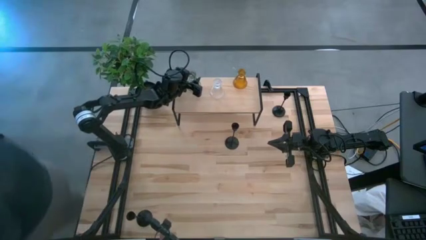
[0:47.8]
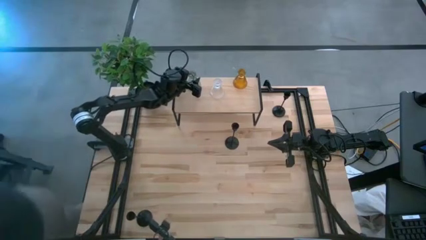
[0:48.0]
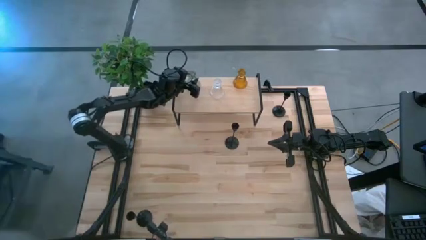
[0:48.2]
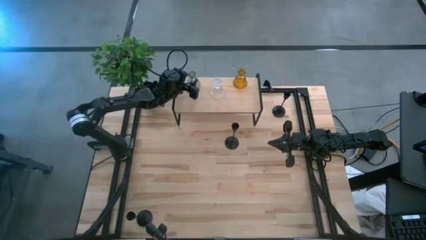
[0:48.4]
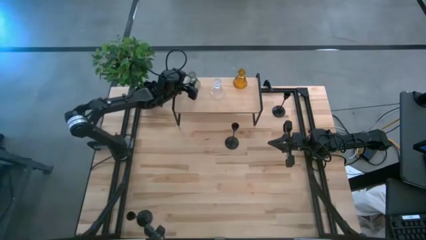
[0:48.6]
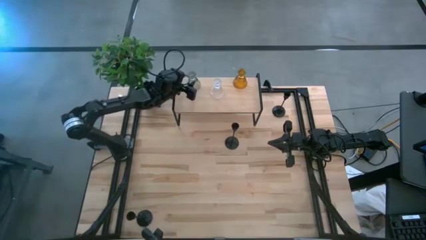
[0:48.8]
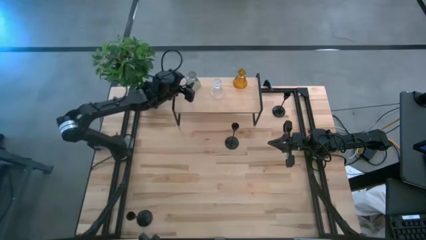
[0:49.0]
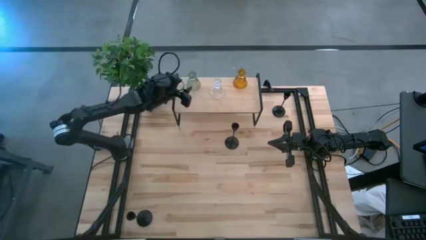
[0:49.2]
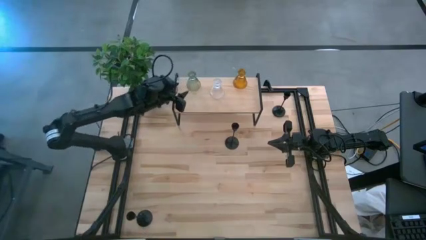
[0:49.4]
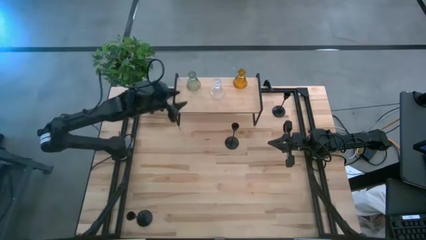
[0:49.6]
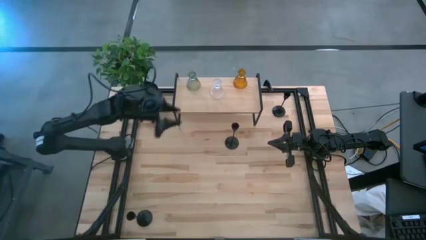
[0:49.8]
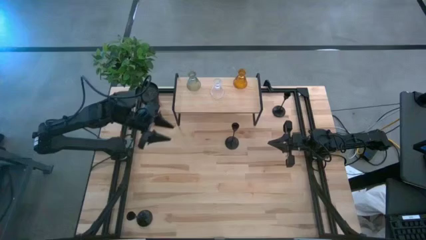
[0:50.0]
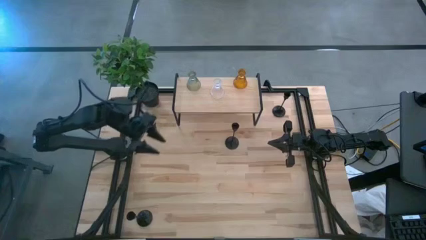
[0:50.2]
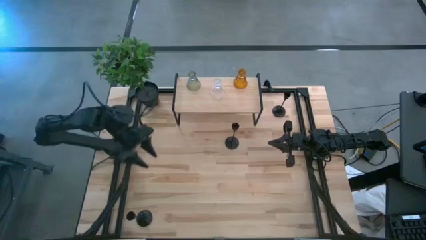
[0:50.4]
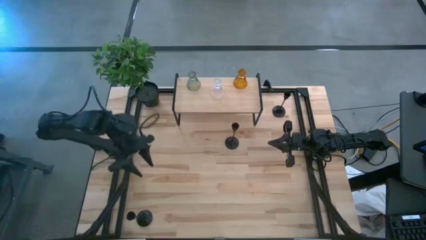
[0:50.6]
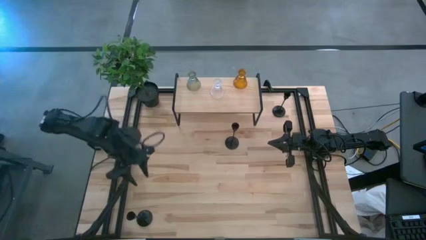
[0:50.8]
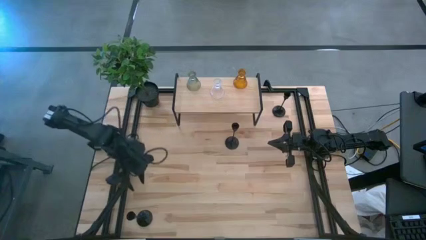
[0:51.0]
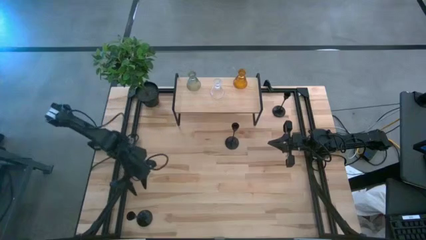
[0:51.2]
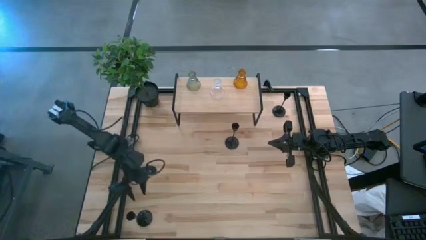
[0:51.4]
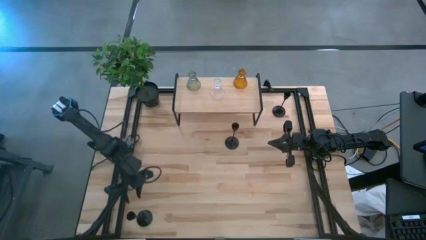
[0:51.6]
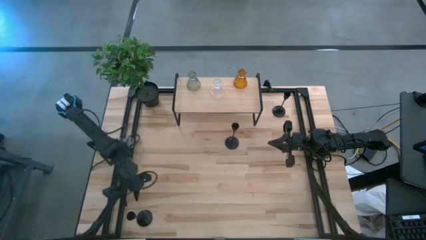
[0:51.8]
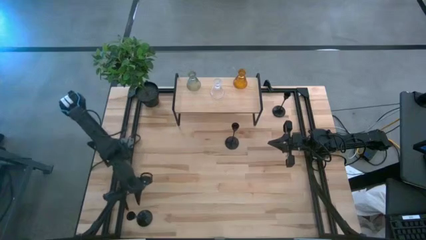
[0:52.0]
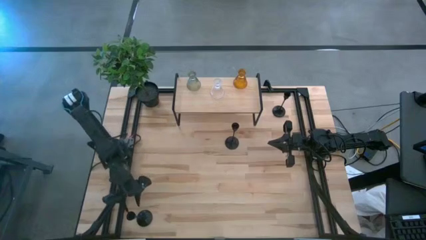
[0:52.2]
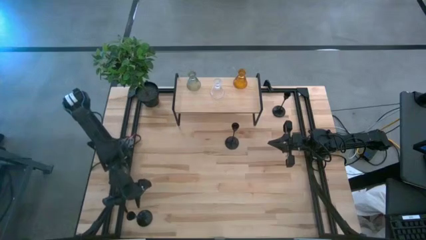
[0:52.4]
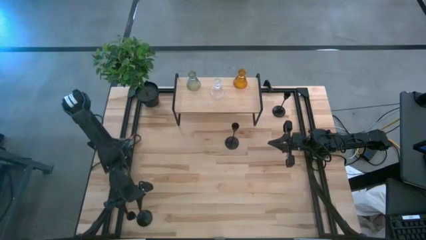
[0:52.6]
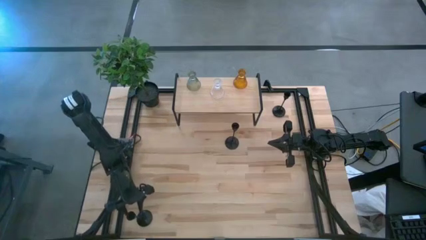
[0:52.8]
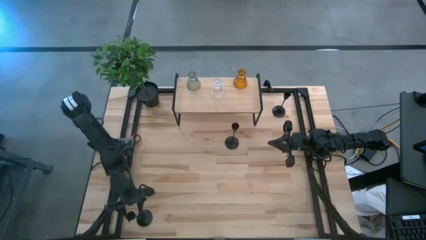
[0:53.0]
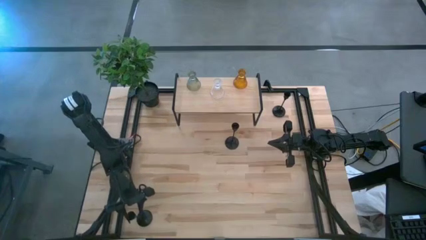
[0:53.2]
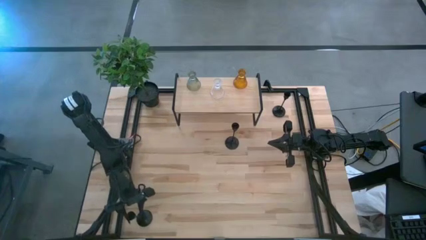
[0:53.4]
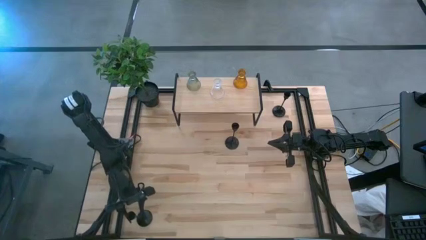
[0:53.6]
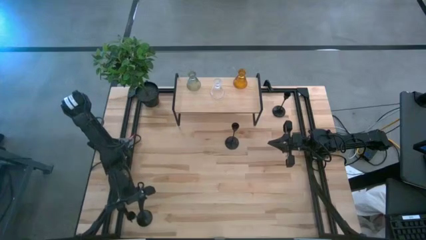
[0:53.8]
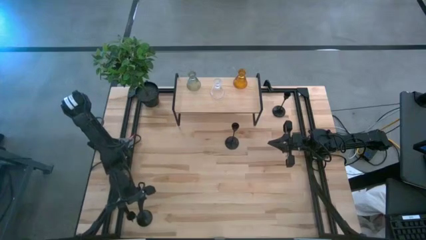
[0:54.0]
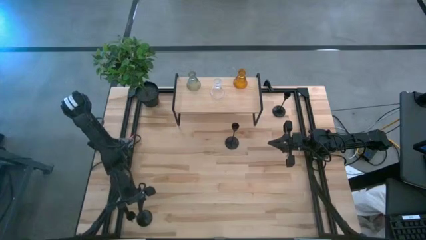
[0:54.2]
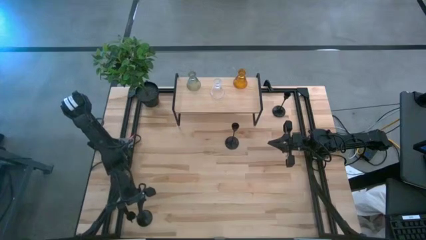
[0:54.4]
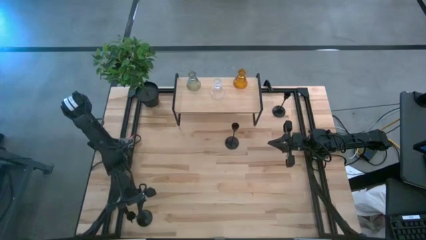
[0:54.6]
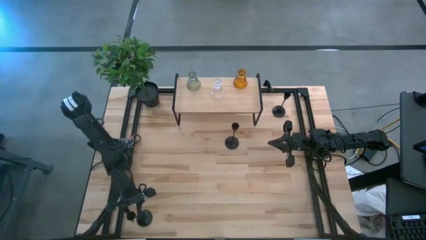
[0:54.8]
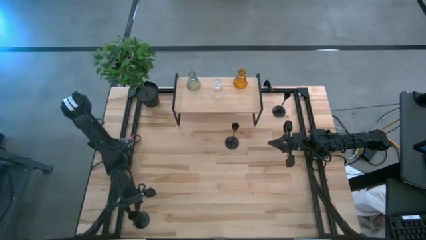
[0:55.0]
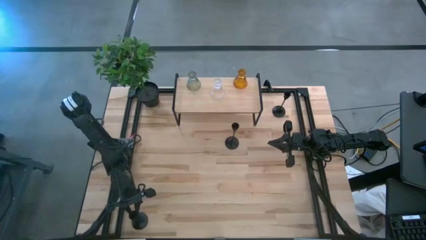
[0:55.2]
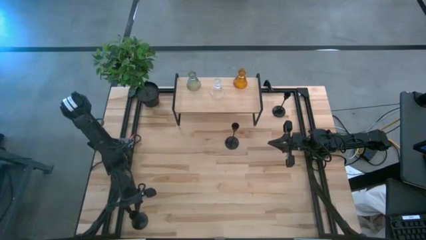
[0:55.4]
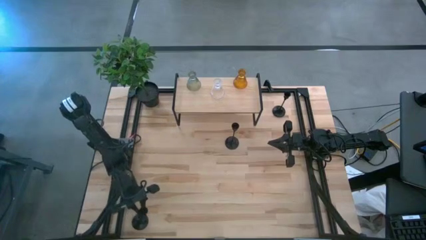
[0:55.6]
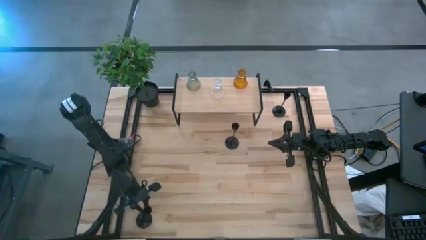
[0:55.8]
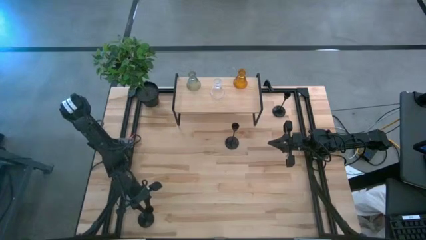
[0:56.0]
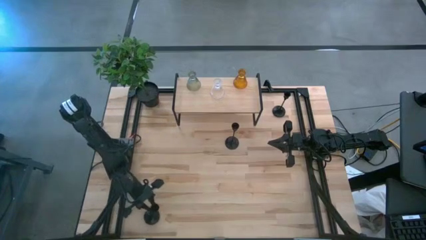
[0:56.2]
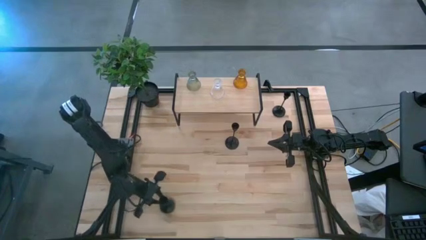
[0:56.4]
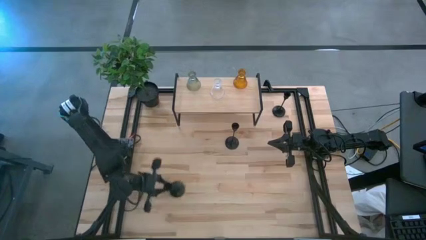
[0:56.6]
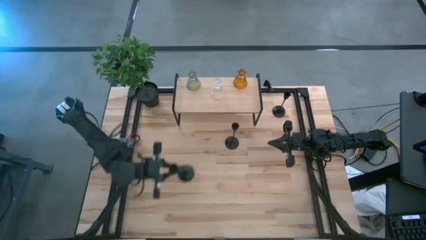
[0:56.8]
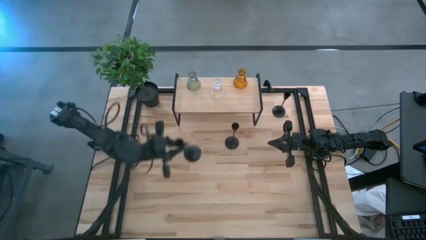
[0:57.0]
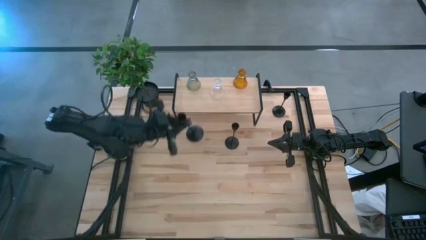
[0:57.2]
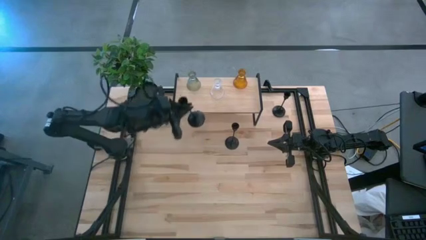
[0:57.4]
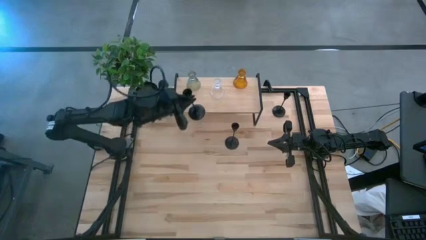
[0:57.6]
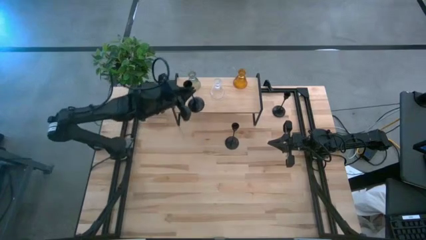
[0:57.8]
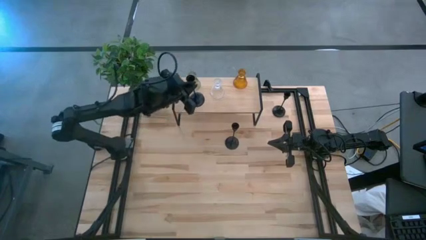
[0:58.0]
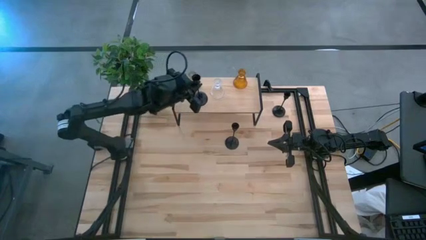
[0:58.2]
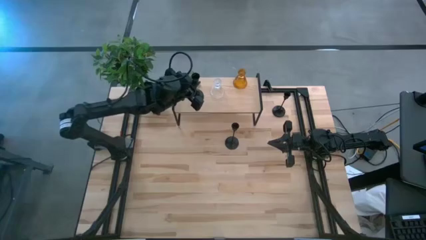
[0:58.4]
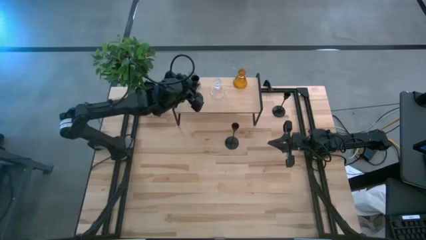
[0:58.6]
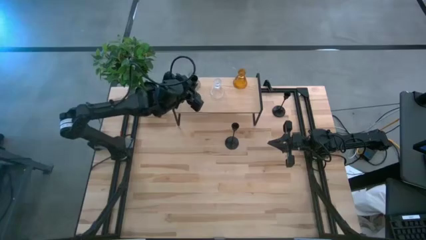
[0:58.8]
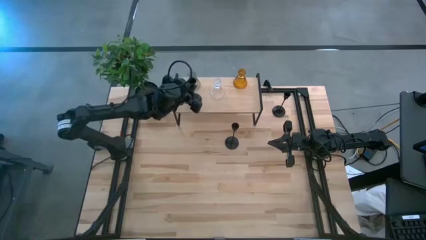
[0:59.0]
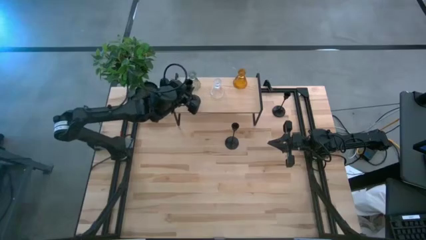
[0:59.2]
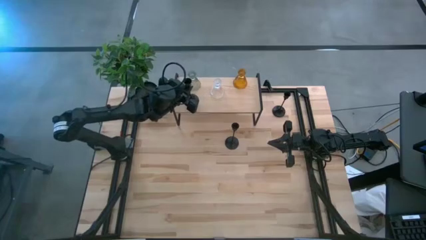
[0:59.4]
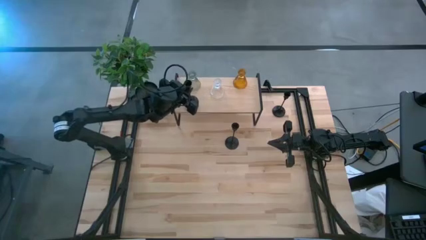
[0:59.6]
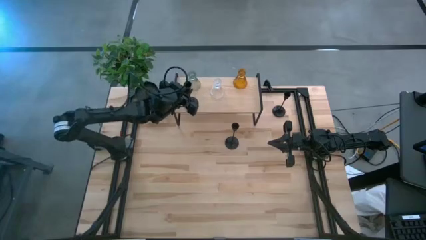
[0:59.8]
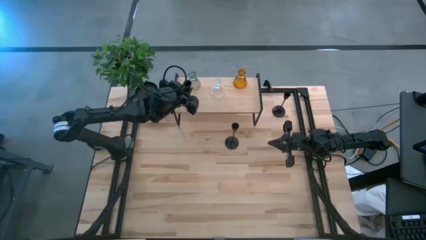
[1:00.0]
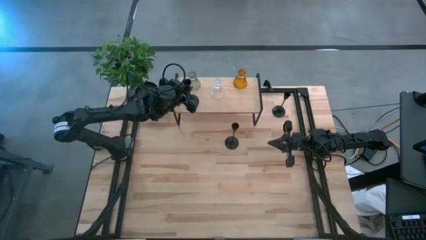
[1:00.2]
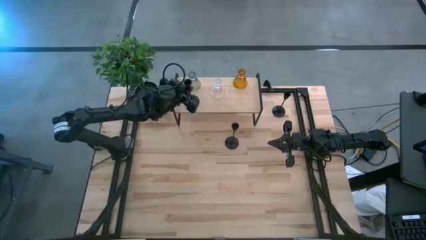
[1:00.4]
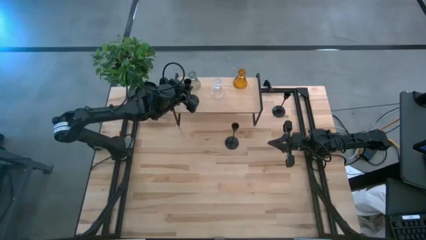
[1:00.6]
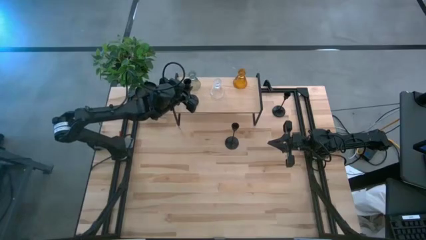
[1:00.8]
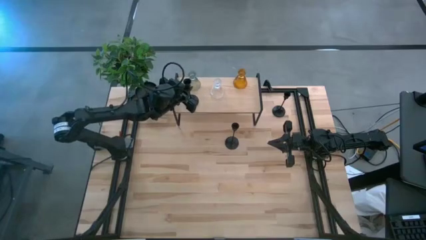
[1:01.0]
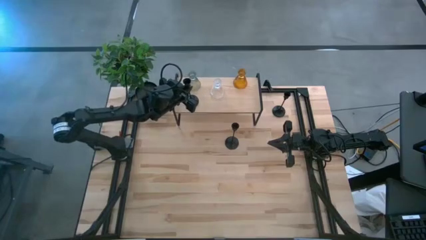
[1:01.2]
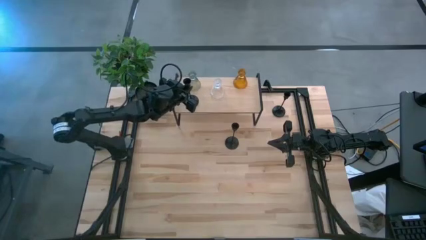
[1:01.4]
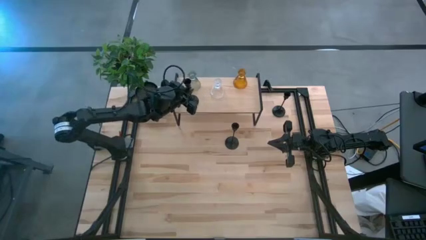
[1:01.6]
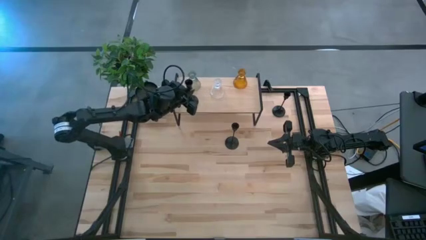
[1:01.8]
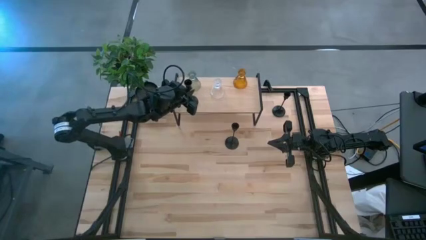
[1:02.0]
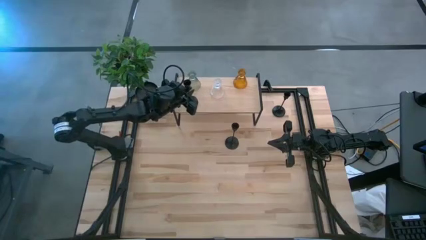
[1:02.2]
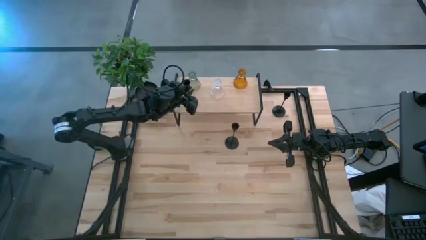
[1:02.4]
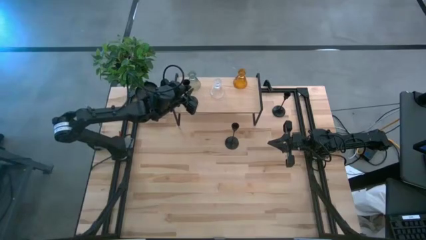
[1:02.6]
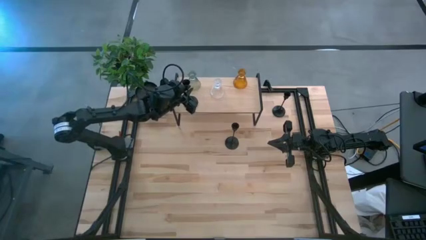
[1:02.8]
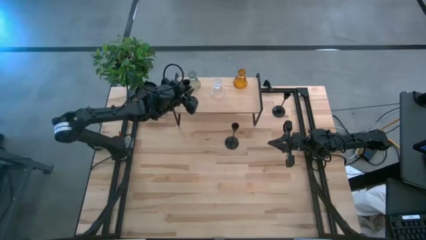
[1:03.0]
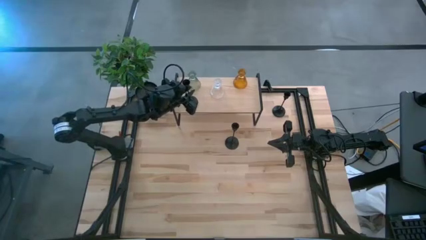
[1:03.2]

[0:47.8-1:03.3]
Task: Pick & Place candle stick holders
Put the bottom black candle holder on the shelf aligned with the green candle holder

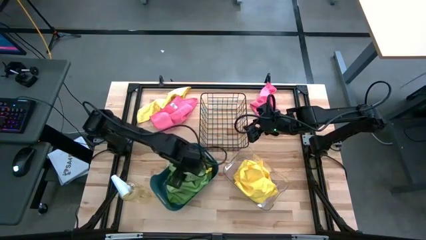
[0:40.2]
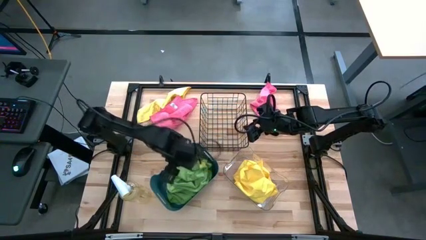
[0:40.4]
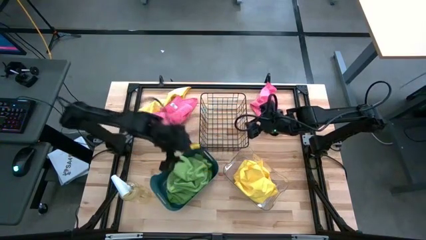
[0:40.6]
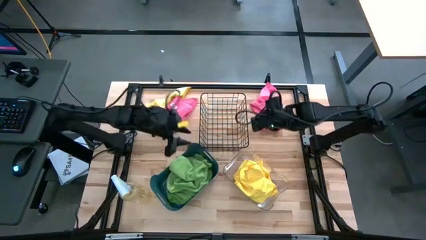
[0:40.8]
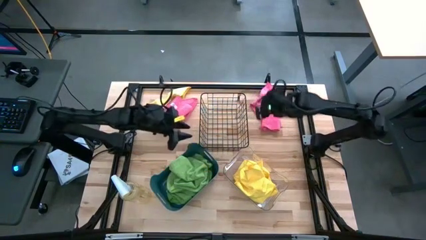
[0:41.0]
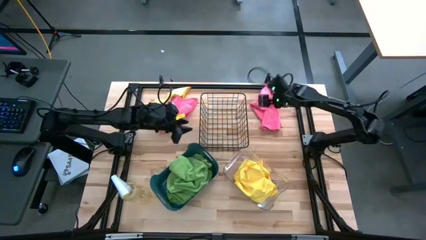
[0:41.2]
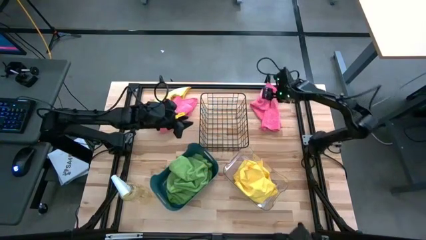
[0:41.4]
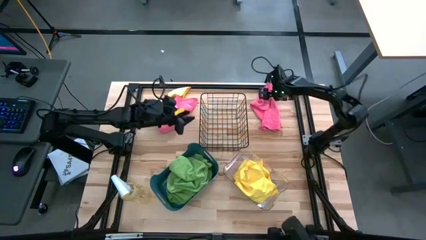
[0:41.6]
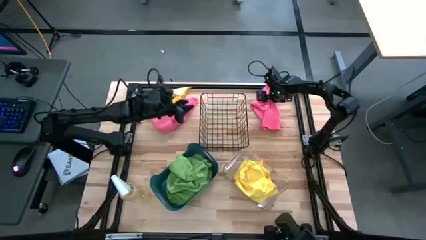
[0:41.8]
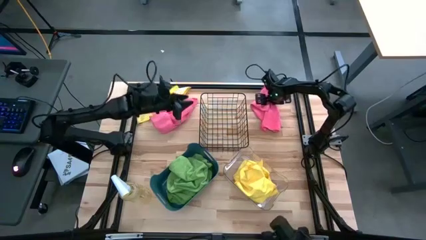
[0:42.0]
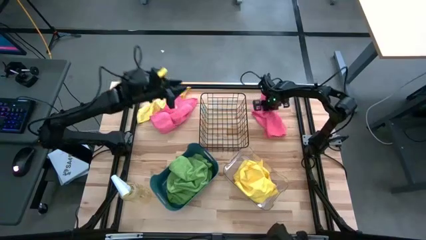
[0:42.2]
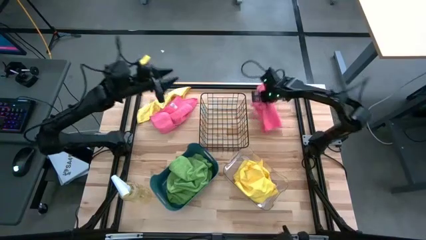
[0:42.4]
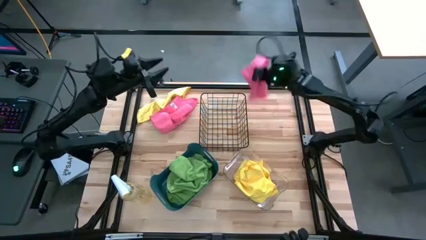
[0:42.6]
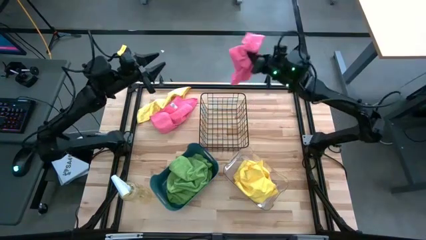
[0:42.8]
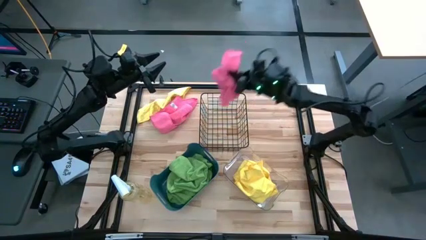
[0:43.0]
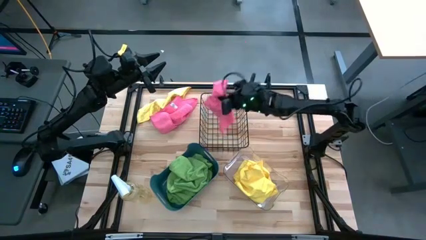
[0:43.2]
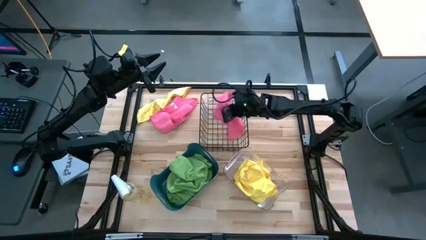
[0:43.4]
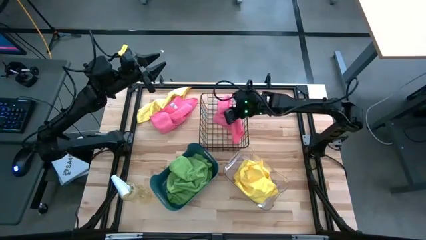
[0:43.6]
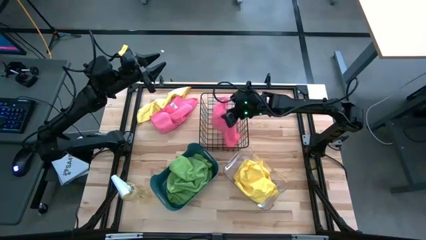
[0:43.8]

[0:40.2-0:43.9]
Task: Sort microfiber towel by color & place in baskets
Put the right pink towel into the mesh organizer
